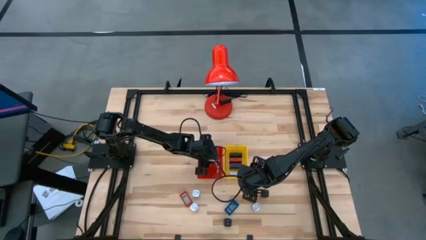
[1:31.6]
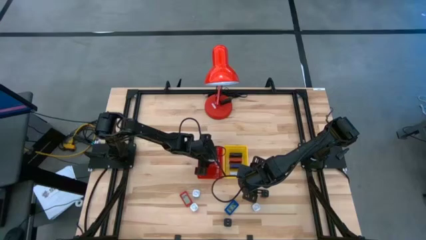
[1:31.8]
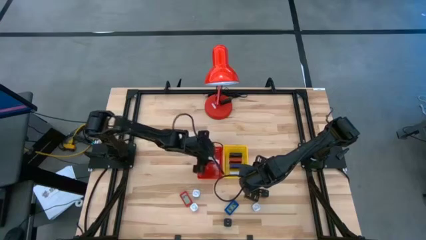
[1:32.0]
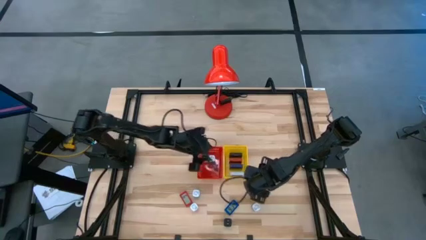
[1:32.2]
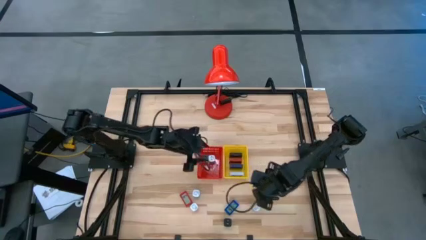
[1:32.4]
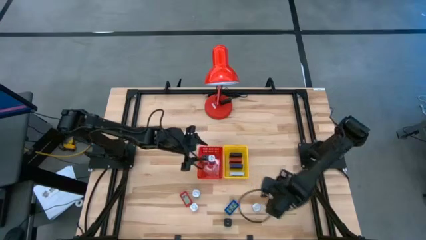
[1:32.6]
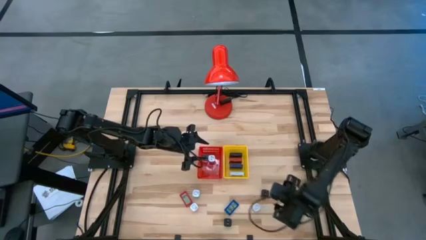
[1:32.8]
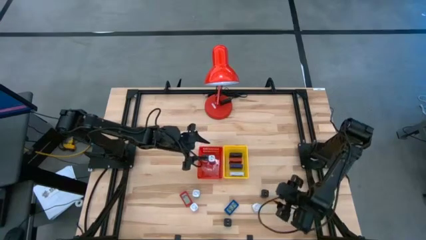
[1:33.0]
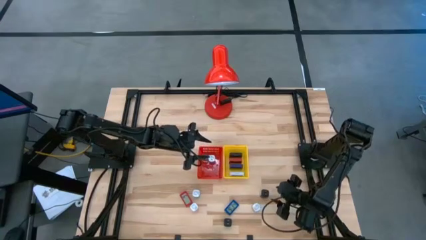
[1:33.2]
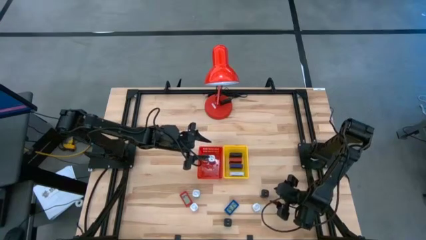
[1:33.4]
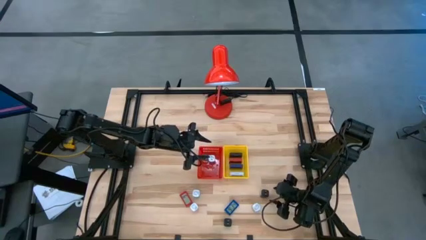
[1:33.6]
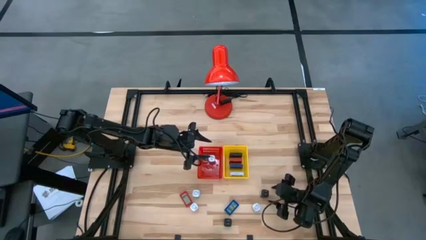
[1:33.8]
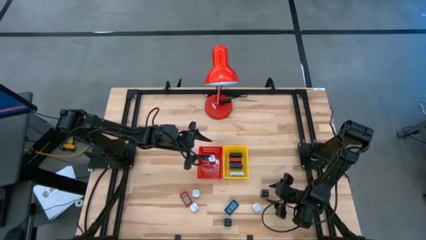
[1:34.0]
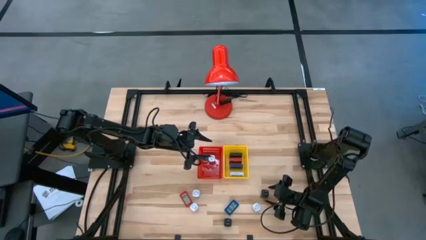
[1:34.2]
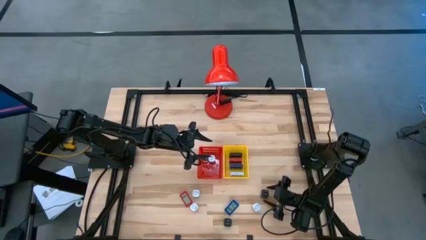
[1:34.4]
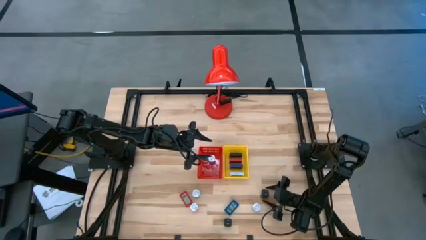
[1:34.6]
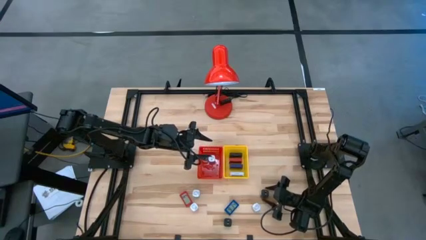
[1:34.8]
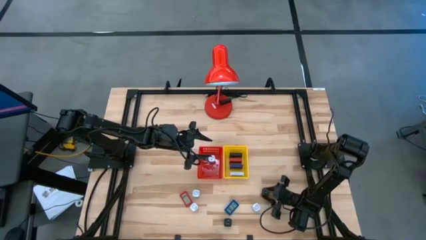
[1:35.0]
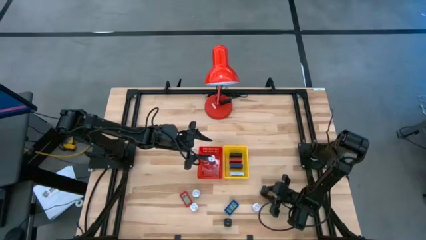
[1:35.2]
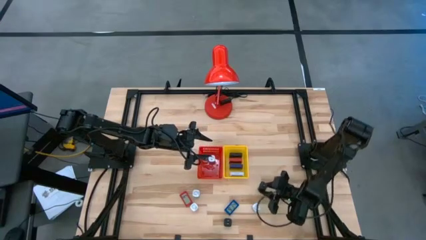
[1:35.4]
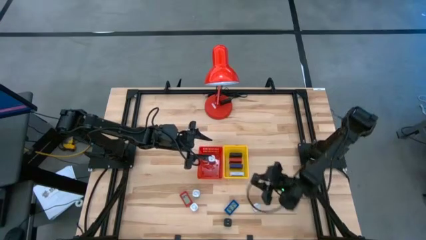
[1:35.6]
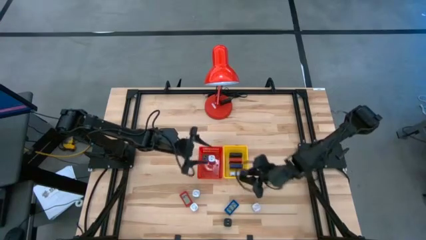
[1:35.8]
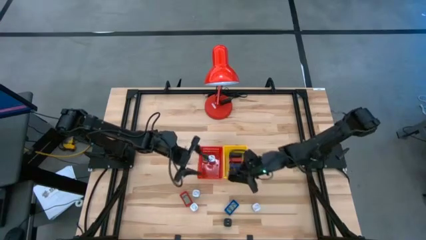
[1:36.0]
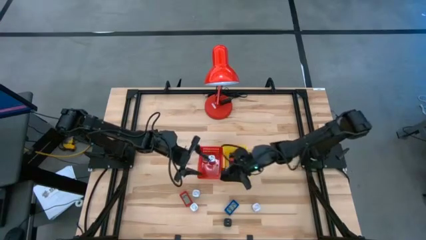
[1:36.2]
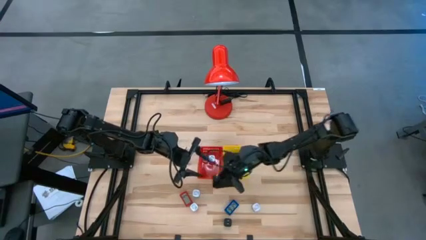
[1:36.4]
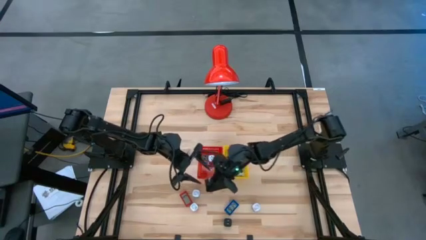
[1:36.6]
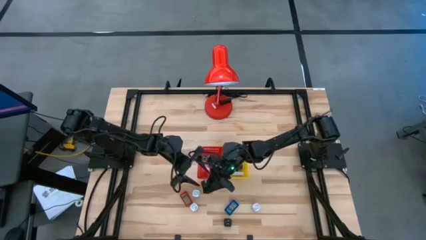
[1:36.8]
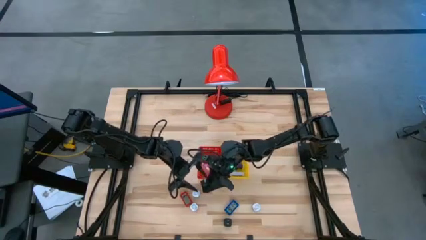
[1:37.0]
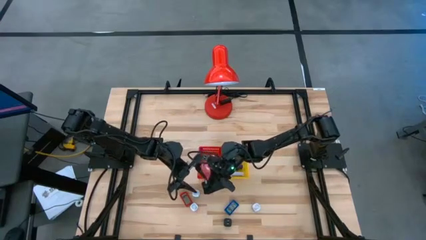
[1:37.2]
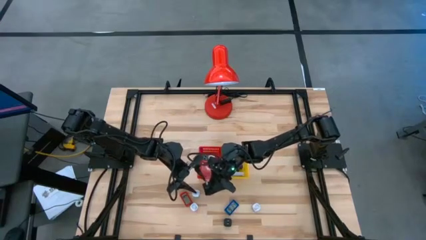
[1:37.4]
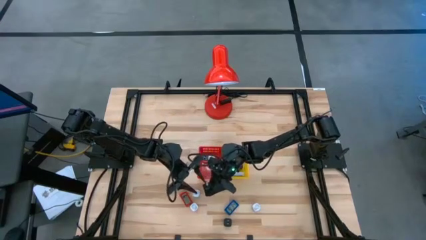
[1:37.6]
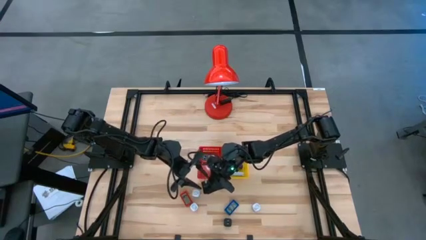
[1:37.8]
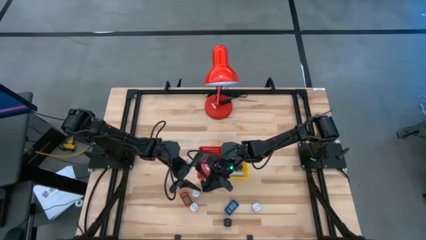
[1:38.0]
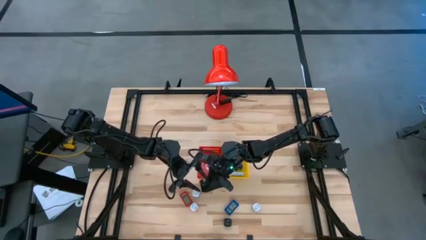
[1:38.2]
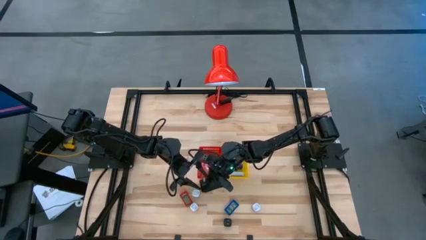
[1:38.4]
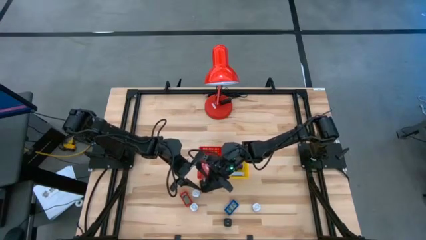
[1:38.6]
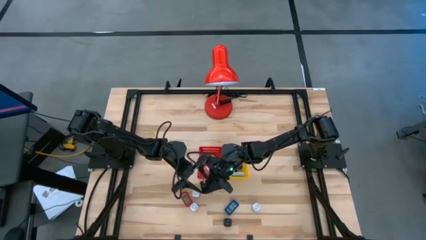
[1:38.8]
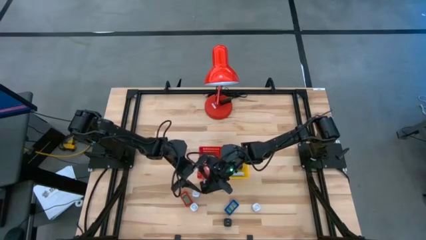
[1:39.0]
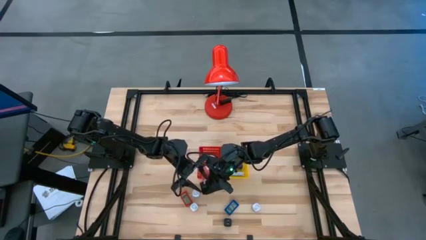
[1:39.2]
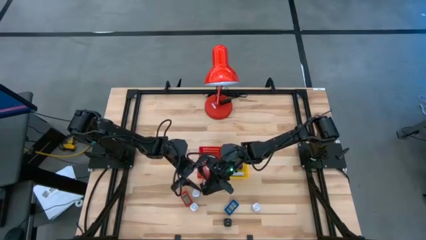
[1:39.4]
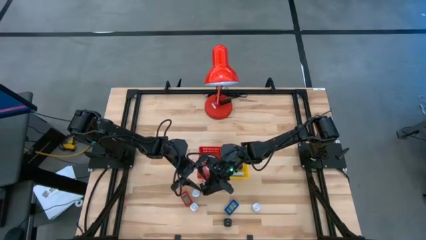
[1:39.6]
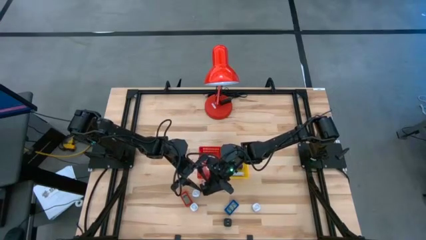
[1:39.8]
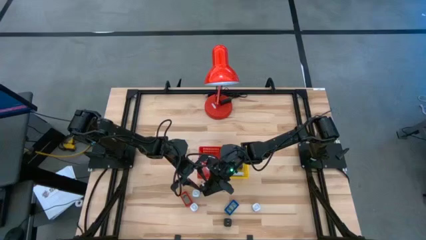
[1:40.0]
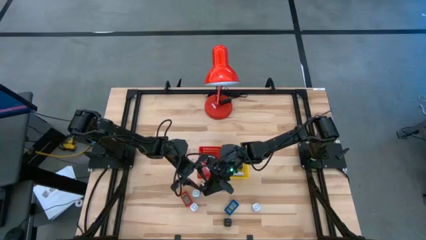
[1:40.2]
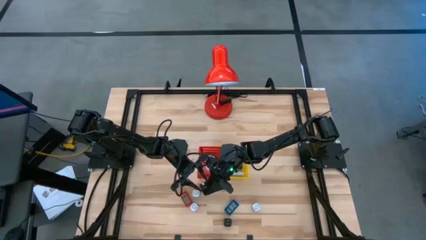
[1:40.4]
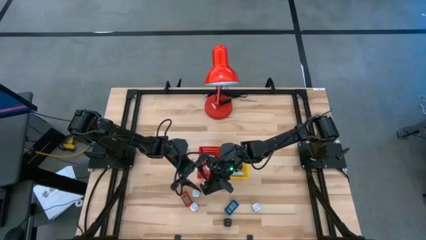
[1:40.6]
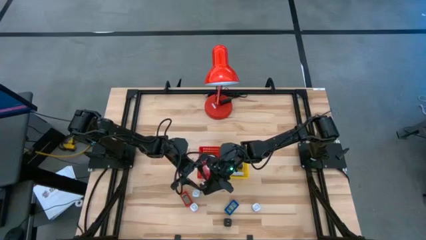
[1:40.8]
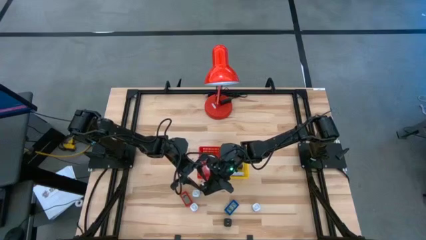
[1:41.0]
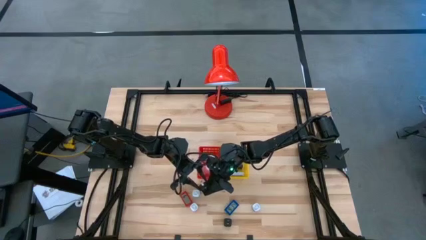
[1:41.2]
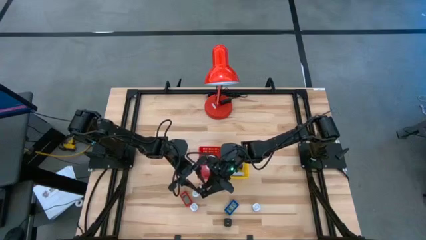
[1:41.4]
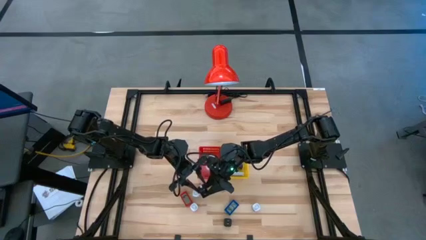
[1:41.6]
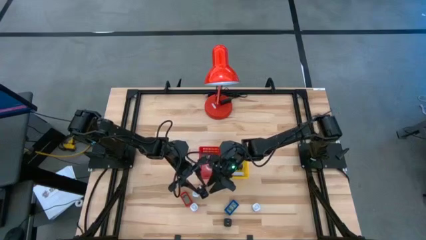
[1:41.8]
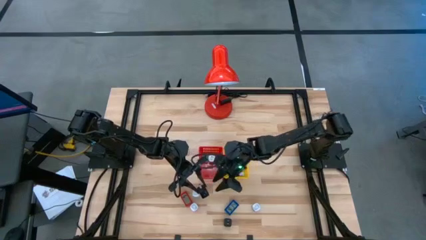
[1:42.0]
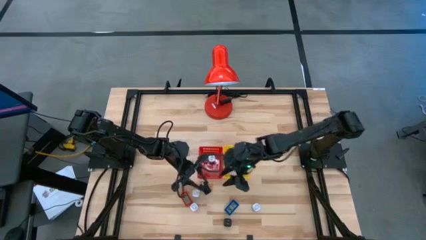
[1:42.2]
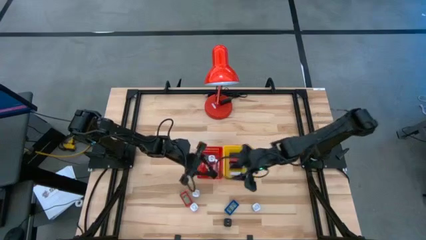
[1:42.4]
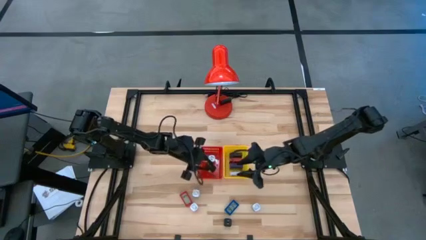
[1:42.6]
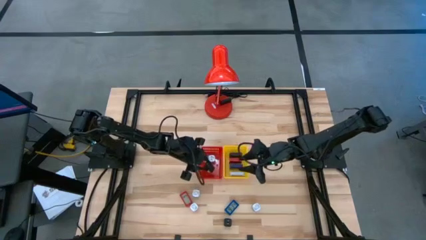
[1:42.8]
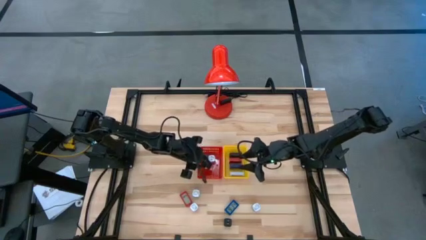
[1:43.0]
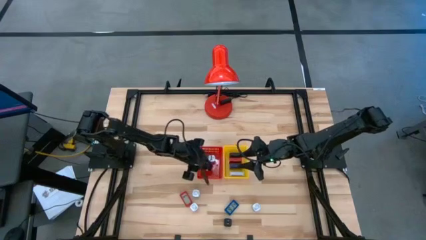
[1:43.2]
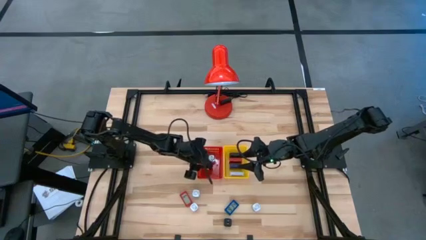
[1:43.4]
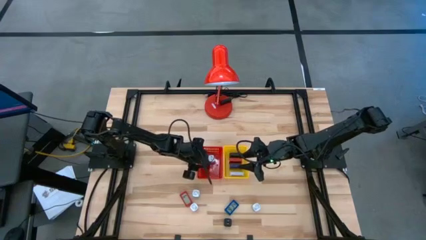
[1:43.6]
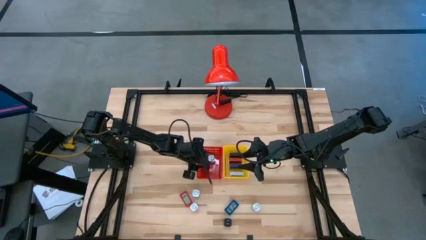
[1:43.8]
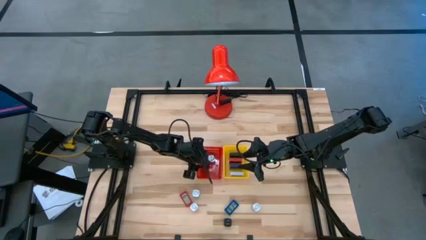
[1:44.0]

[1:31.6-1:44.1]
Task: Pick & Place Office items
Put the top black charger adapter into the red bin

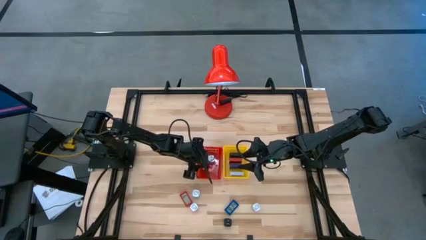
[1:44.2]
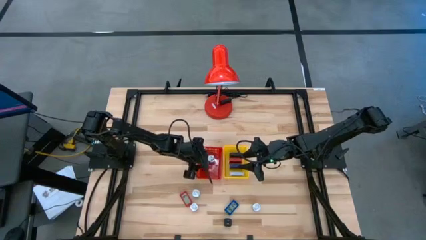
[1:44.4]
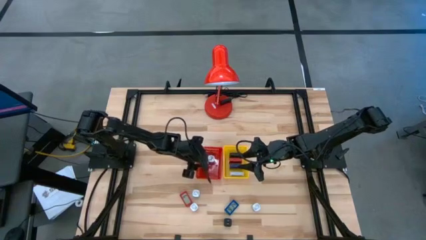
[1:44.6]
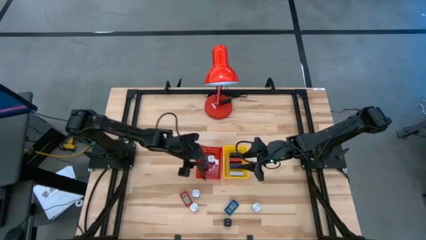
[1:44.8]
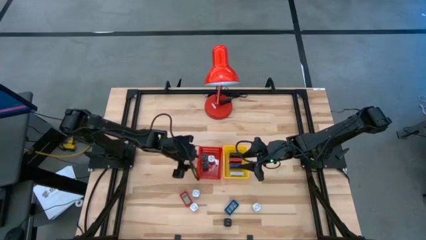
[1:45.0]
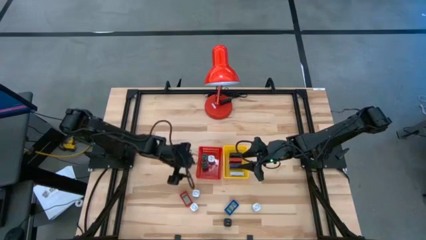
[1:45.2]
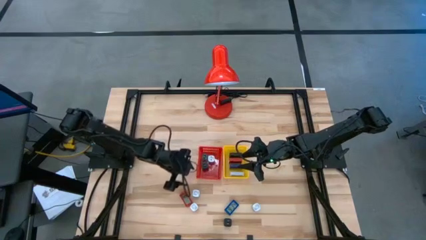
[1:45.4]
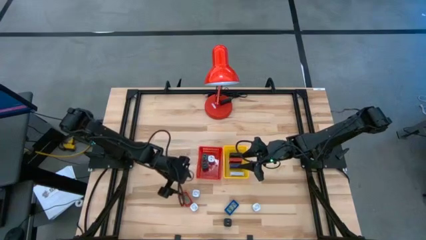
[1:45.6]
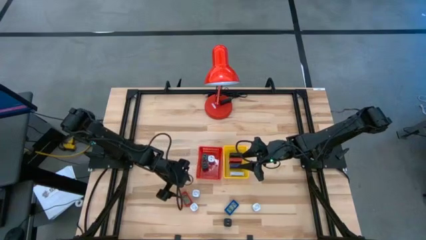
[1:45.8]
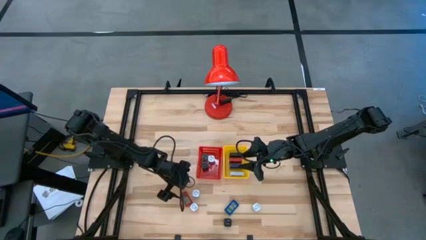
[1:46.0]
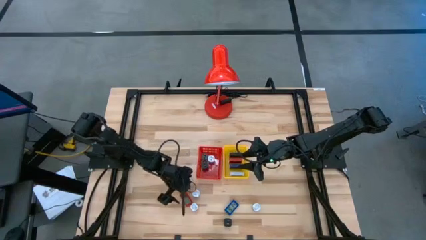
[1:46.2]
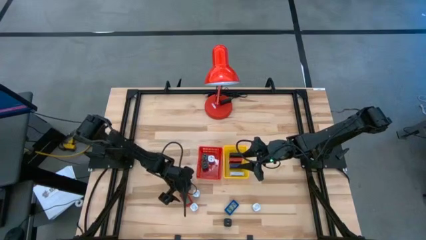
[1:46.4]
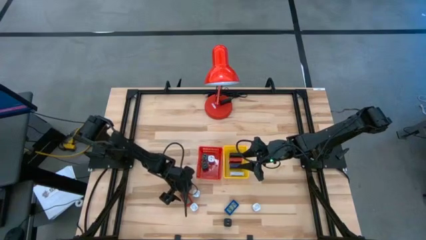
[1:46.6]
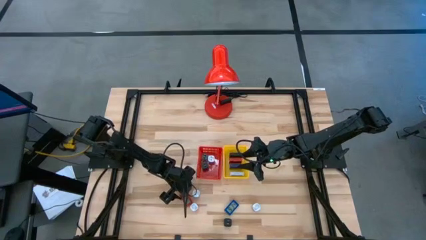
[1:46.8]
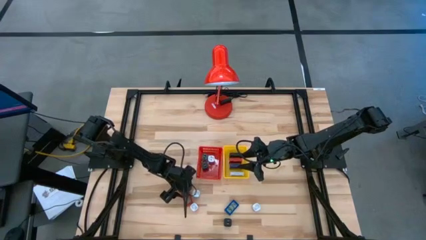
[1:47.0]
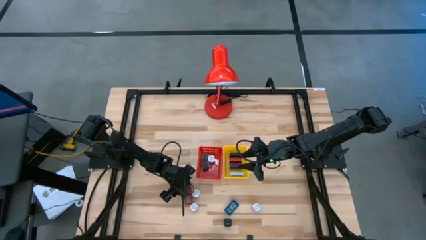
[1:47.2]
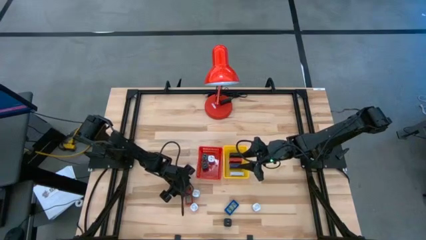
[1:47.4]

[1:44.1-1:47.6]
Put the red digital timer into the yellow bin
